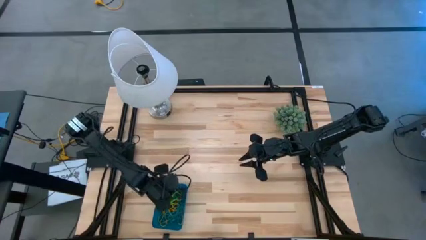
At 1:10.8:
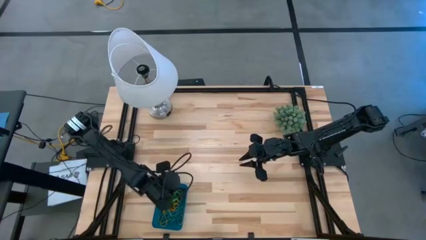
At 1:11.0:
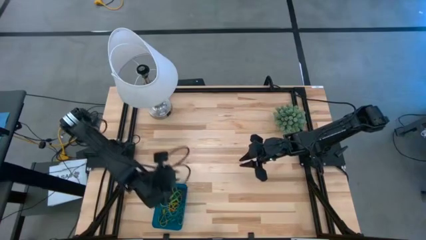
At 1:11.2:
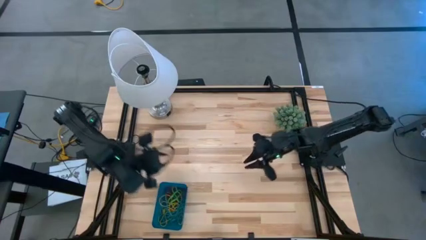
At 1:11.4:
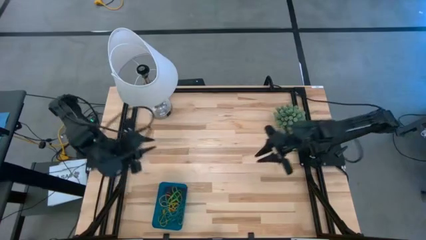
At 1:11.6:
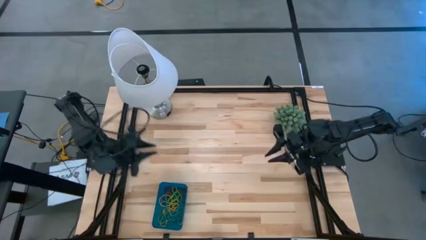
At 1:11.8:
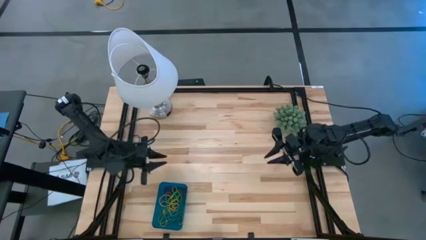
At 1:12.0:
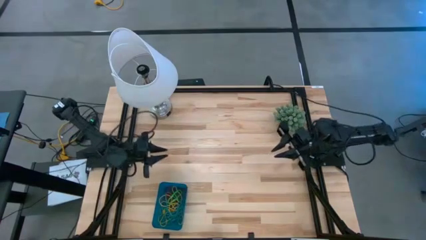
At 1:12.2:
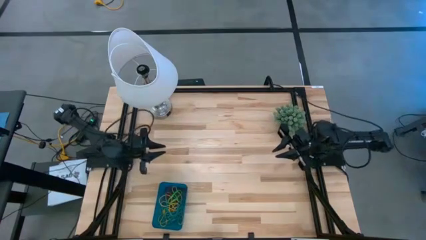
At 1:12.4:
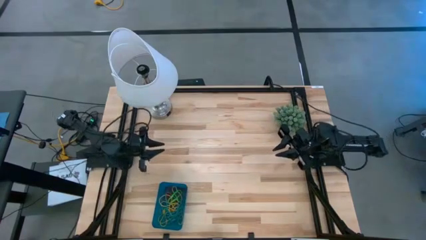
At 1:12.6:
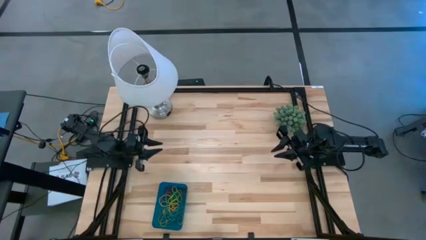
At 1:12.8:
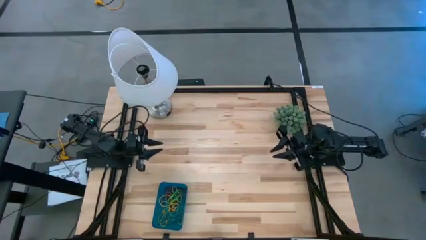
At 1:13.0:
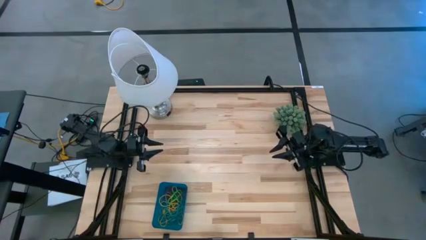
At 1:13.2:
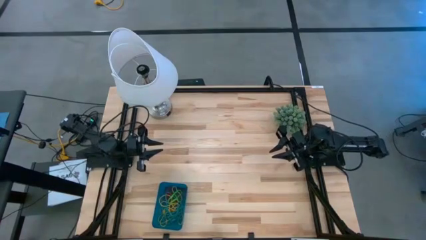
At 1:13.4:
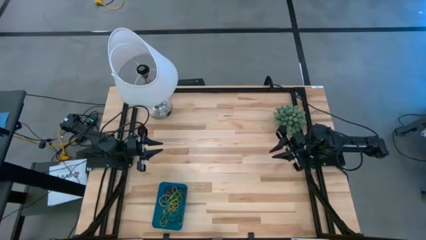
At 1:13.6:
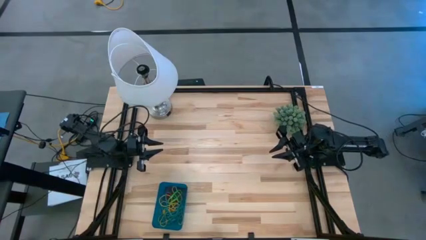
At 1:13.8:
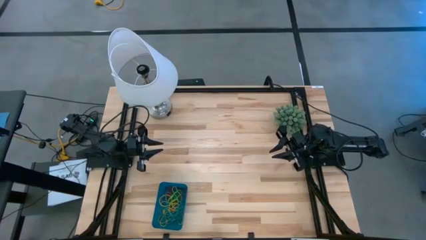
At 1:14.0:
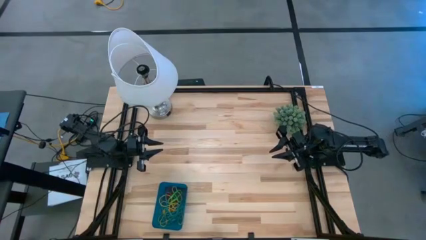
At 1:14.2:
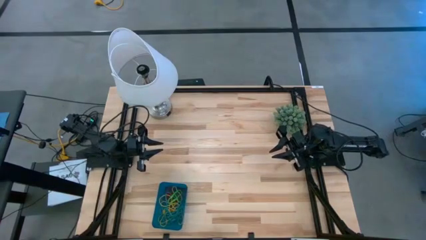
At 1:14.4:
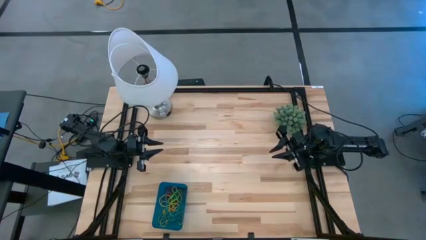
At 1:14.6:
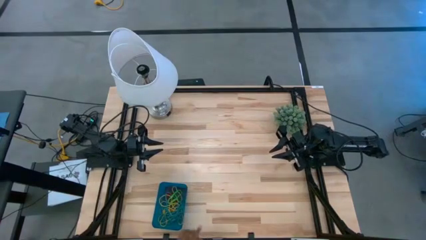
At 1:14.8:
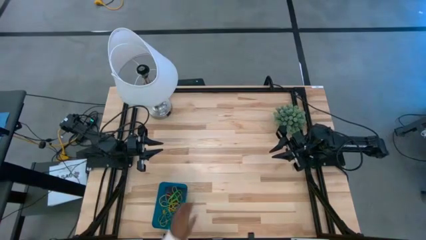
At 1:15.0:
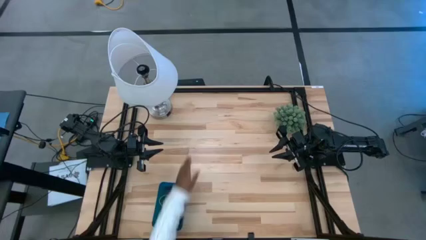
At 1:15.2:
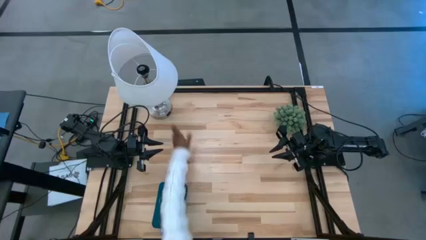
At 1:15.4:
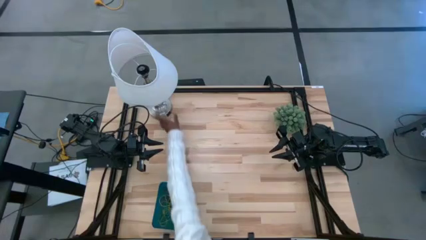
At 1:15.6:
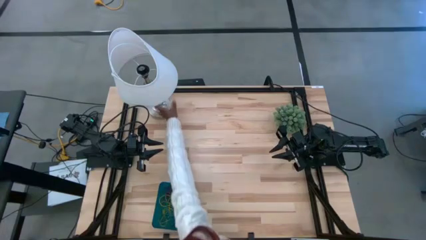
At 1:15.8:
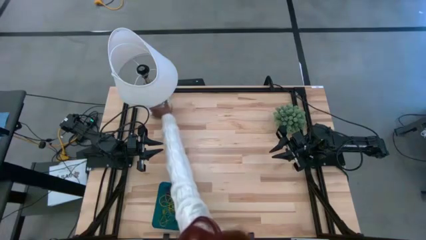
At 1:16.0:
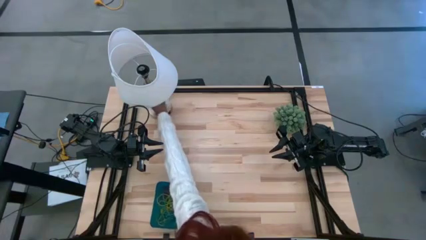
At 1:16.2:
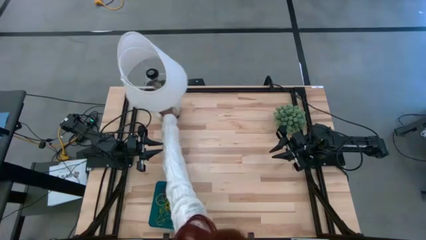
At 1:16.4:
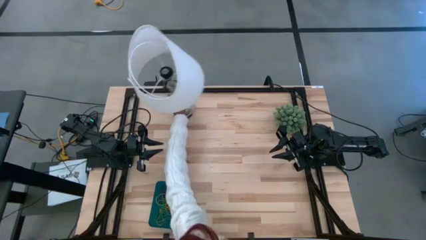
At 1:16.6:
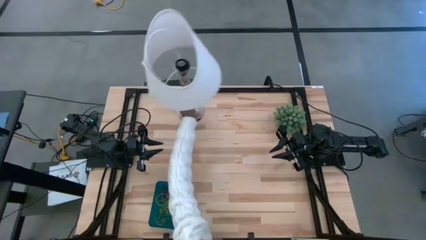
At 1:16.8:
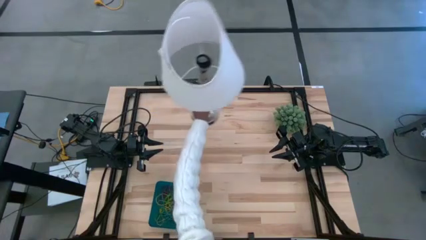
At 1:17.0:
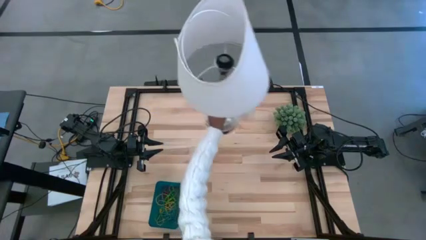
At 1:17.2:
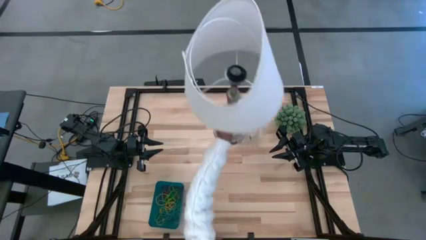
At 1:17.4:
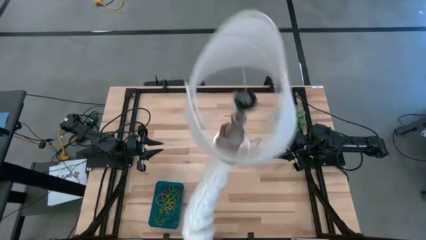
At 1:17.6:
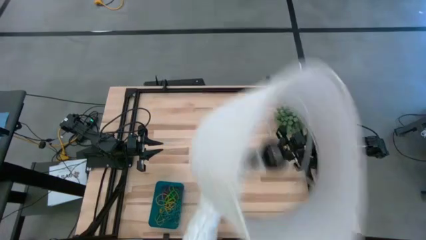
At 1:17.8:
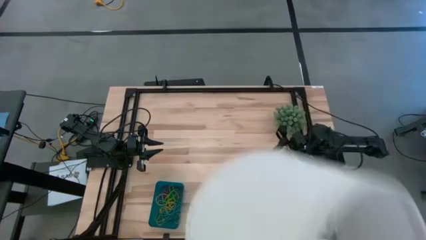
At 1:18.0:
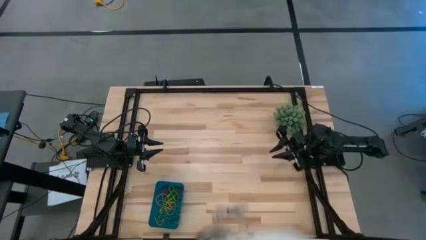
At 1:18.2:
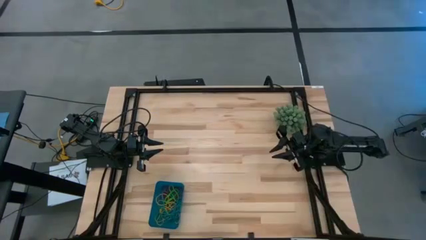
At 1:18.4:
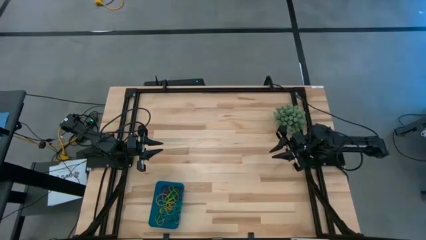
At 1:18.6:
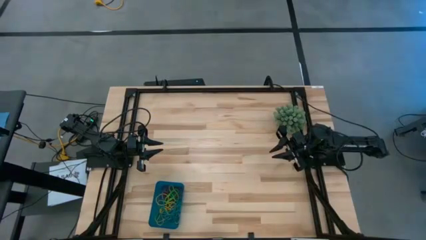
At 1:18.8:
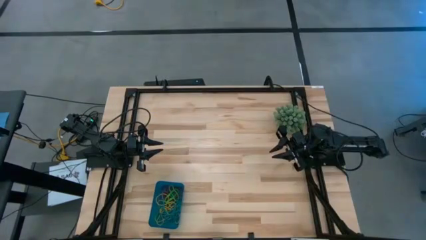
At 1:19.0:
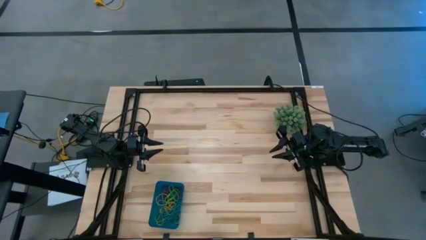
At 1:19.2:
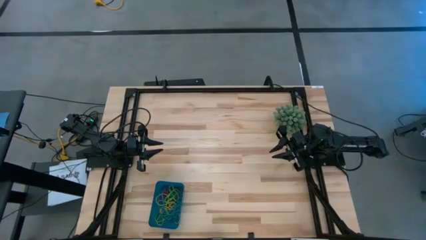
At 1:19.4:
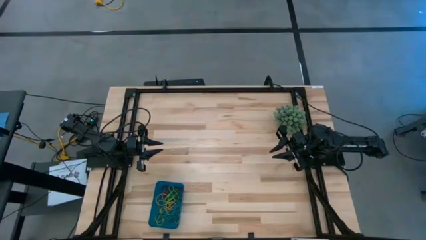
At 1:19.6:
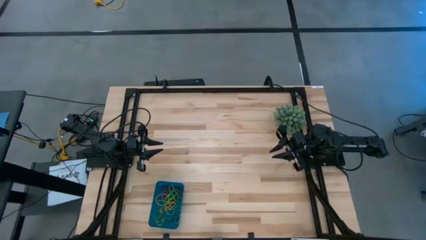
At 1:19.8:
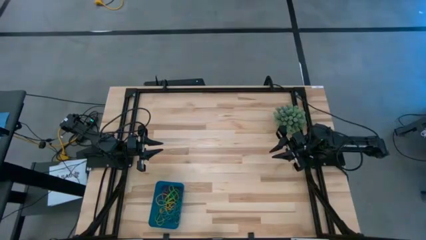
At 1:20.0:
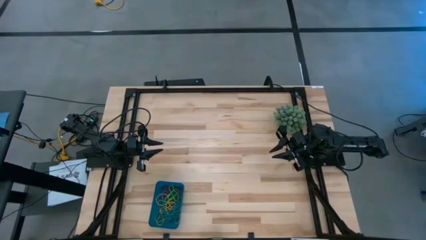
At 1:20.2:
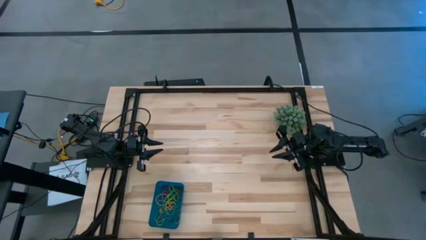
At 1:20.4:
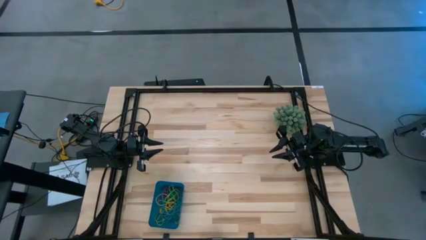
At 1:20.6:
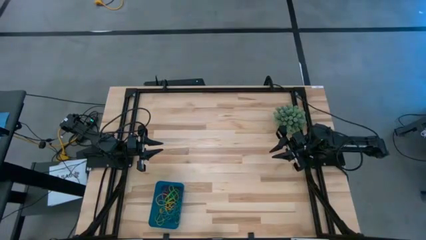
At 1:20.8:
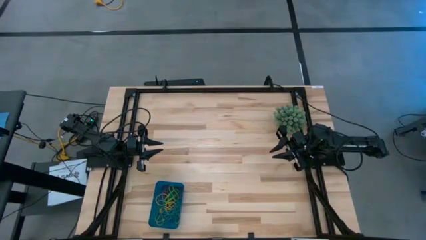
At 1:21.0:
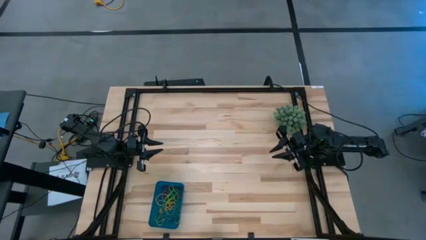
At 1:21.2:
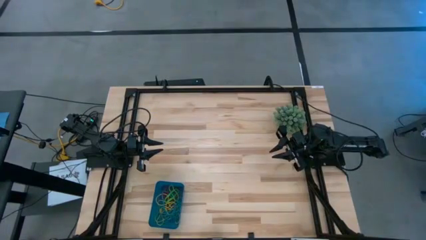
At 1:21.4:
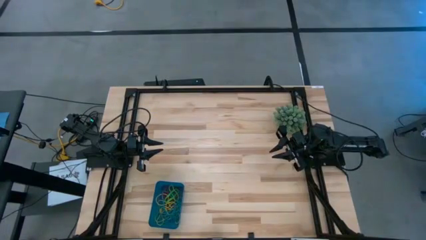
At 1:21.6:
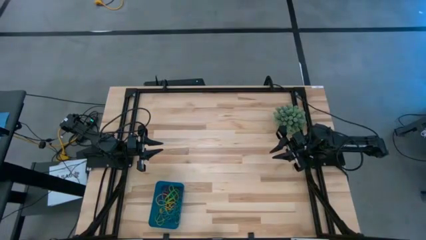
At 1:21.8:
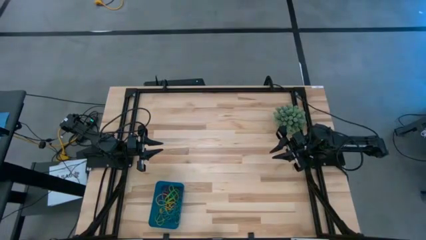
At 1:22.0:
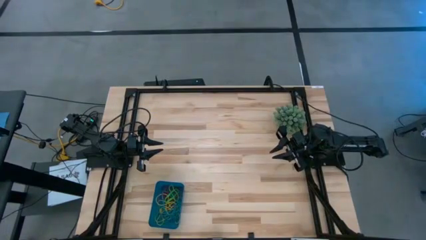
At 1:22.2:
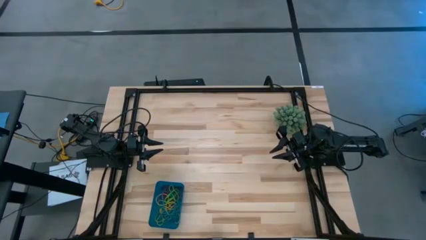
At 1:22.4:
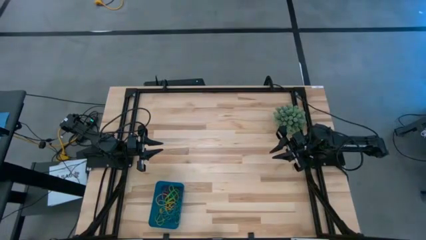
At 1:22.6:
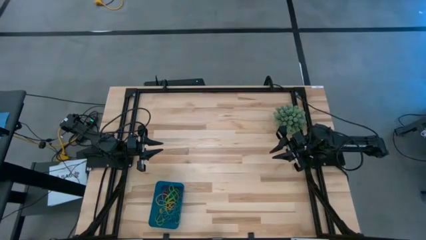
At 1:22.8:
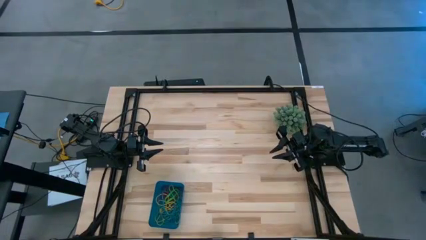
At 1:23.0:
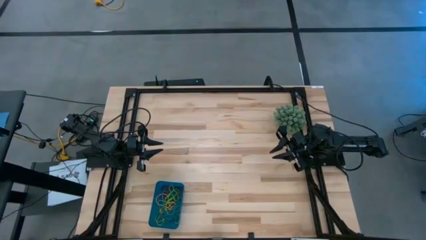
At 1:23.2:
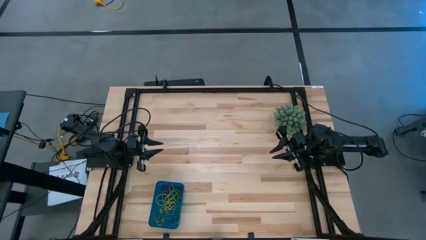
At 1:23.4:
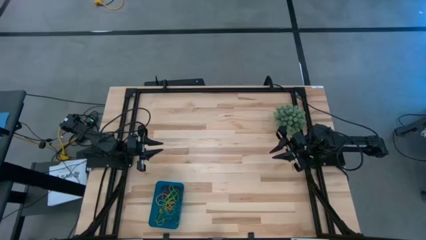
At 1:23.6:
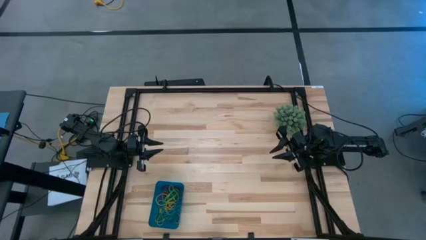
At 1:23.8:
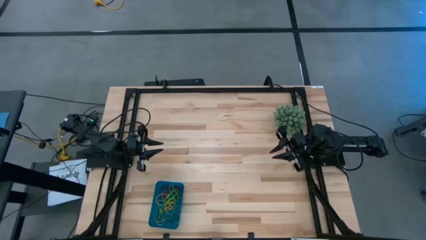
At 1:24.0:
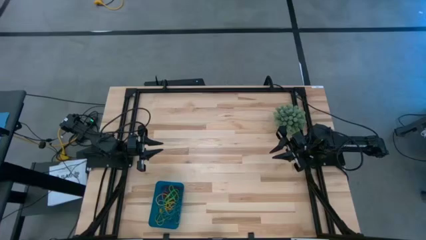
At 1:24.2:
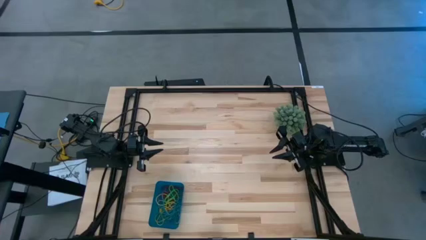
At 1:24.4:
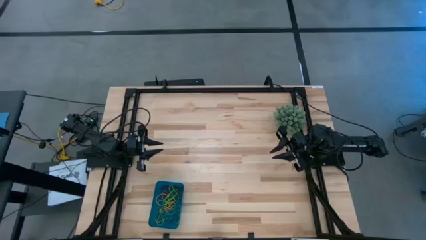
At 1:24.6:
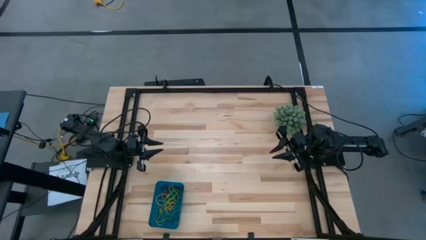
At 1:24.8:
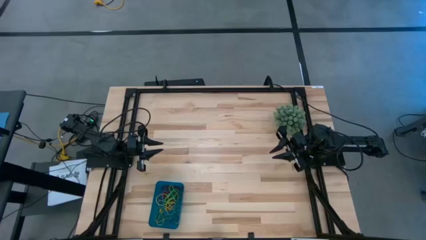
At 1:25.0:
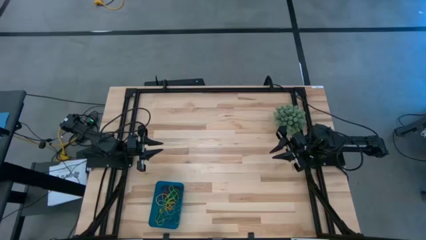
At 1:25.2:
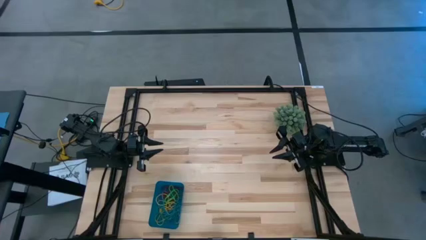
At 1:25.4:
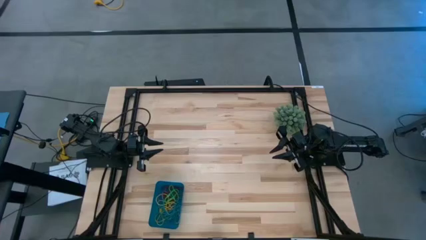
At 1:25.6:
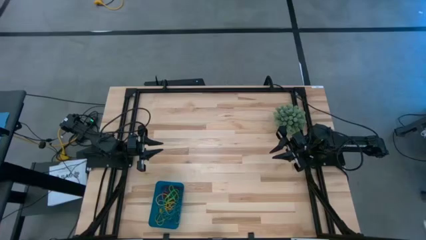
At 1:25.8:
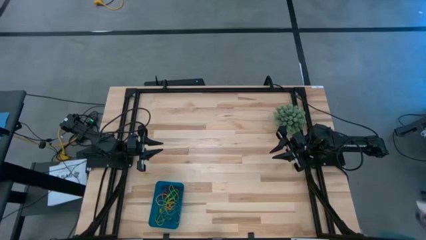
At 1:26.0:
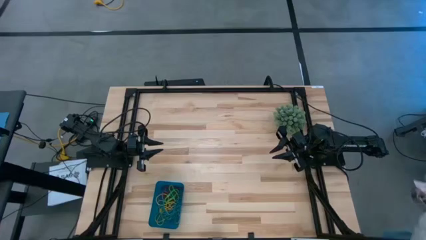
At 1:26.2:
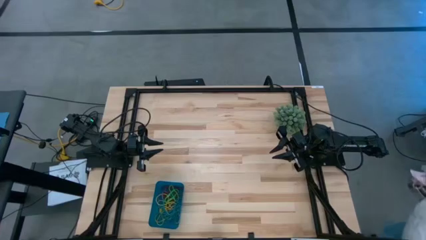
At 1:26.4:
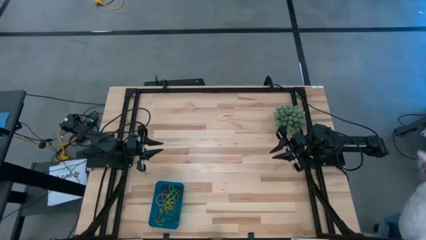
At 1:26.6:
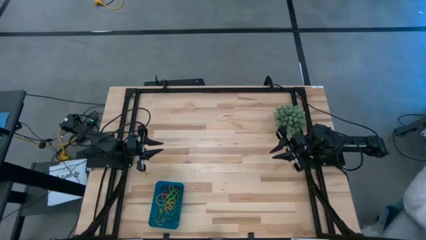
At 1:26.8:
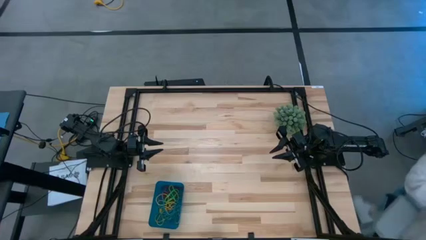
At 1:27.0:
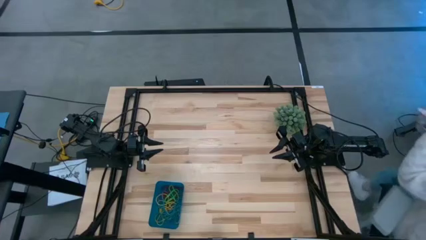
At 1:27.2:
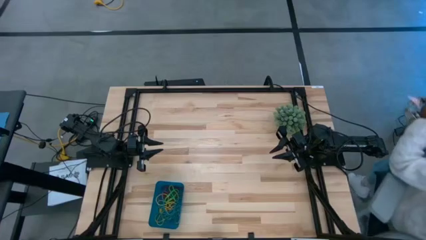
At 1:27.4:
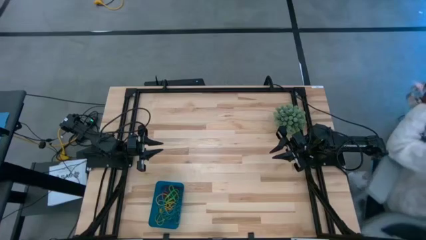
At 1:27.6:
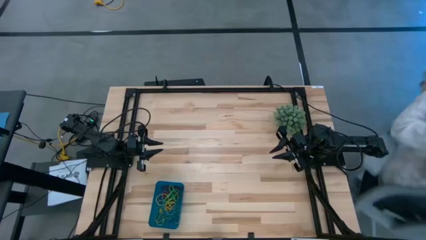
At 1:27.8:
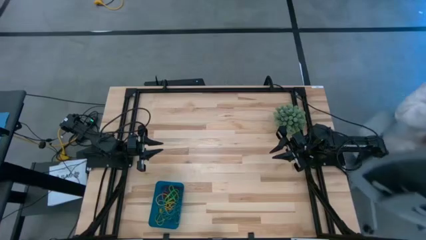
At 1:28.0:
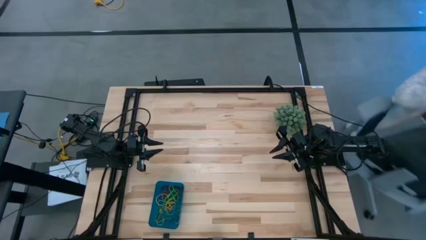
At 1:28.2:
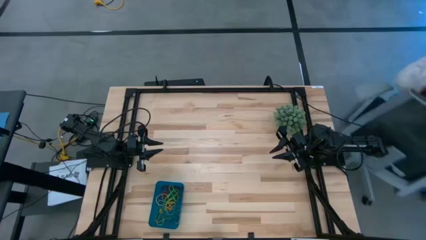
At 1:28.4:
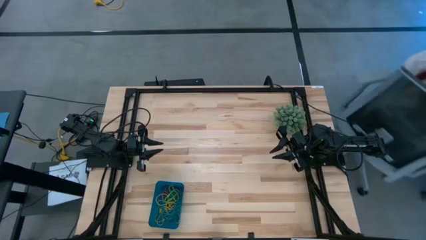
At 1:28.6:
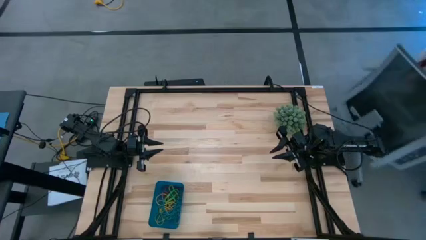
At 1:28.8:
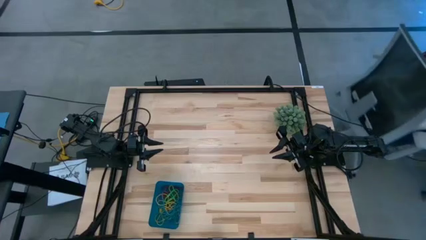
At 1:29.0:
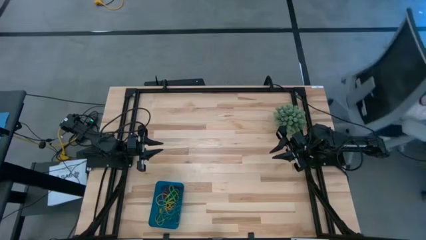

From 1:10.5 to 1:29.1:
Task: Pick and place items into bin
Return to Home Position
